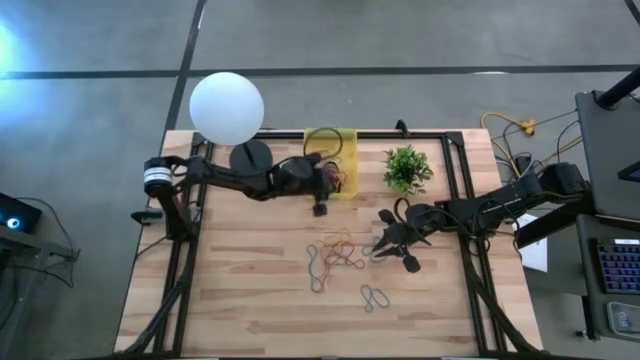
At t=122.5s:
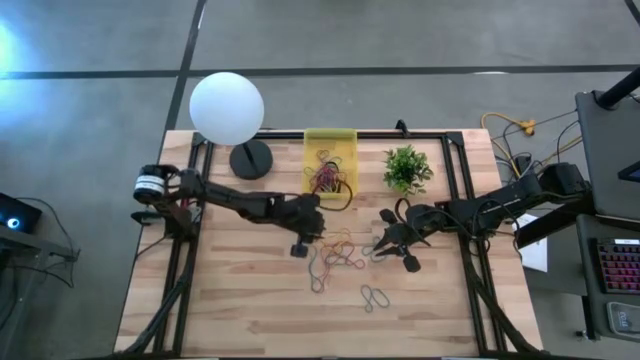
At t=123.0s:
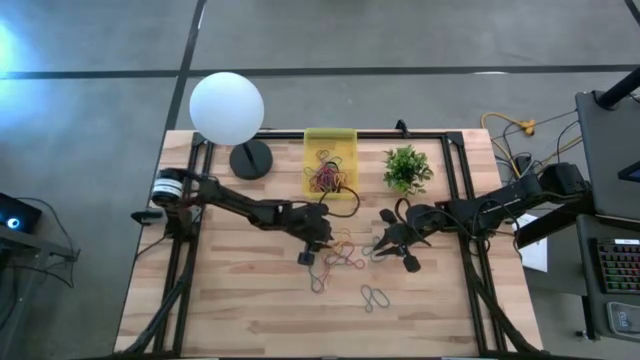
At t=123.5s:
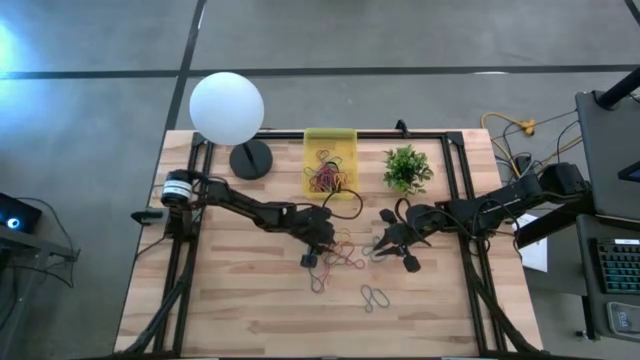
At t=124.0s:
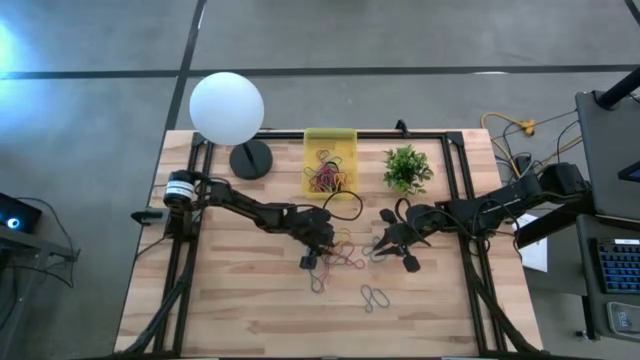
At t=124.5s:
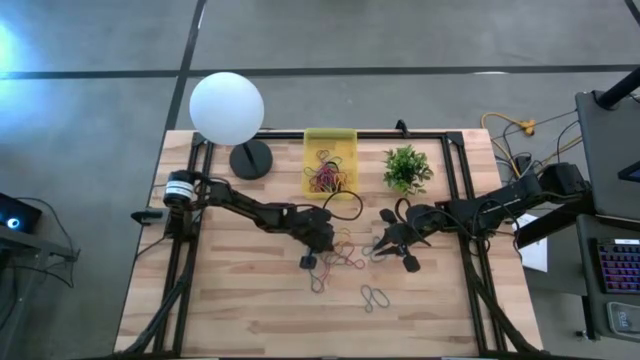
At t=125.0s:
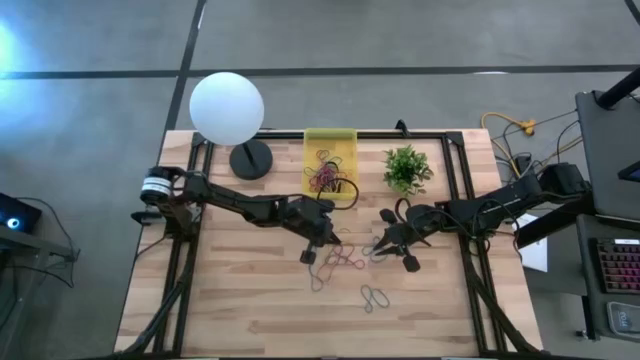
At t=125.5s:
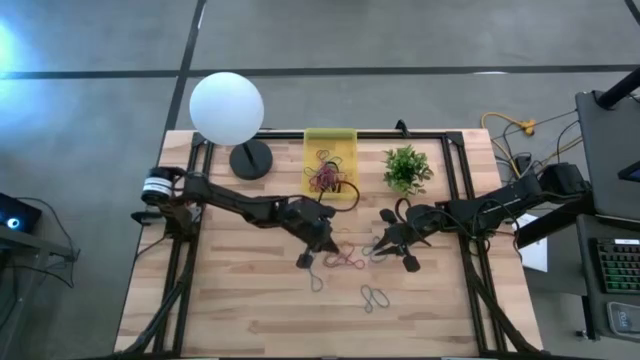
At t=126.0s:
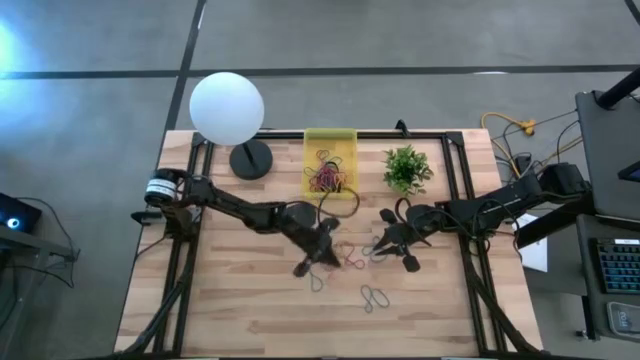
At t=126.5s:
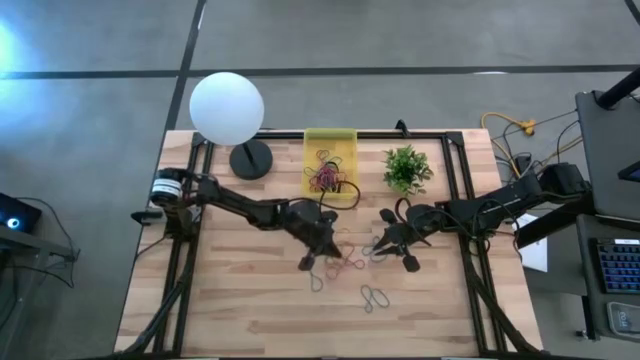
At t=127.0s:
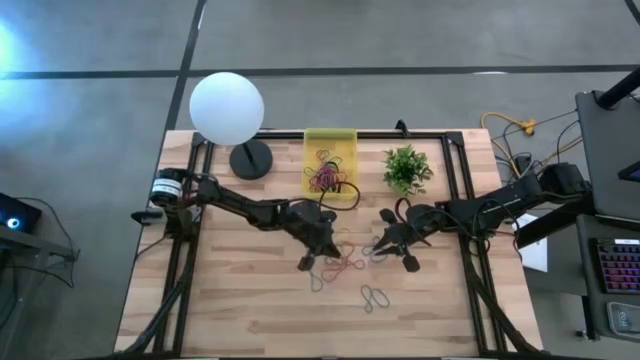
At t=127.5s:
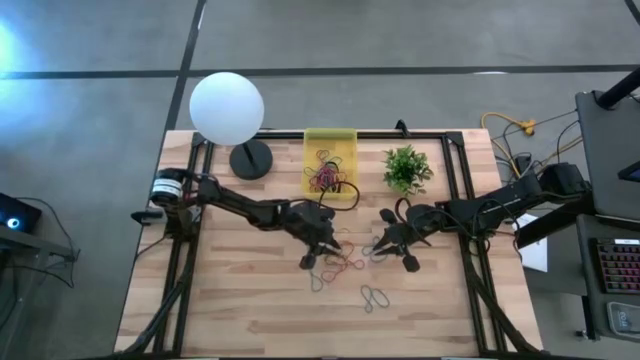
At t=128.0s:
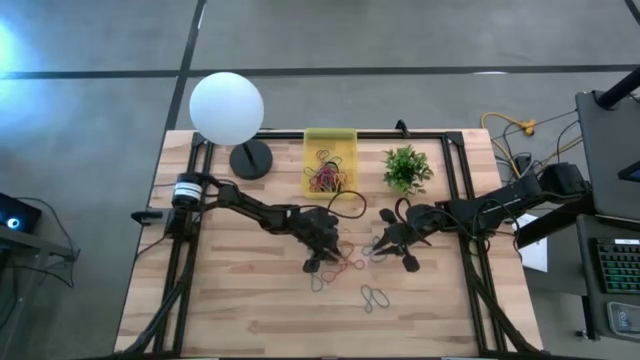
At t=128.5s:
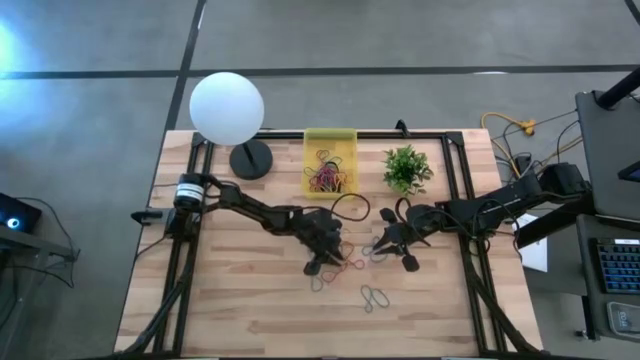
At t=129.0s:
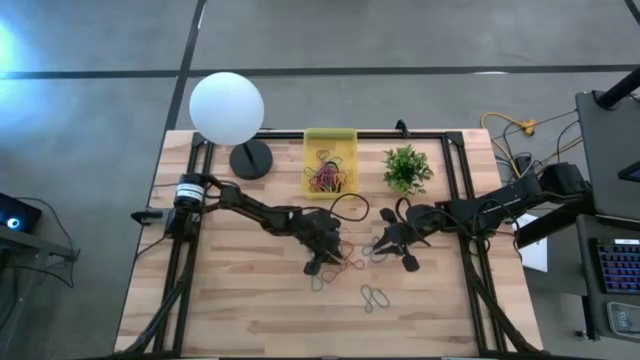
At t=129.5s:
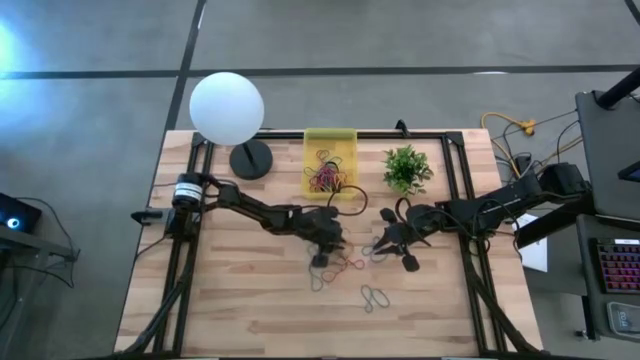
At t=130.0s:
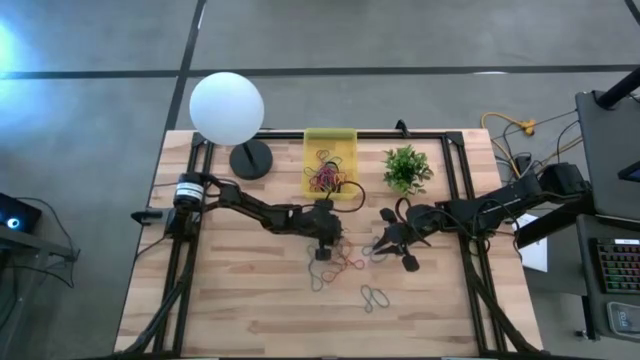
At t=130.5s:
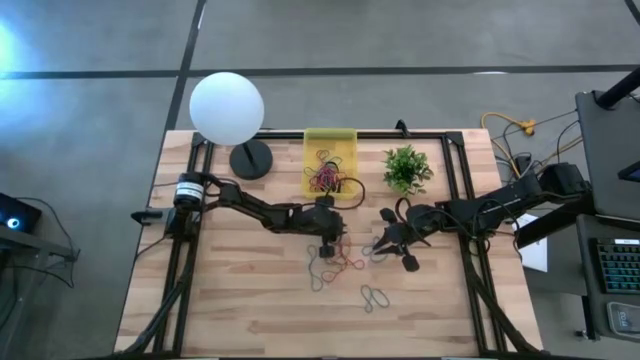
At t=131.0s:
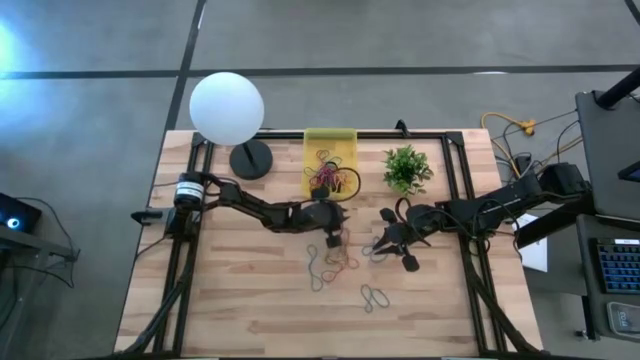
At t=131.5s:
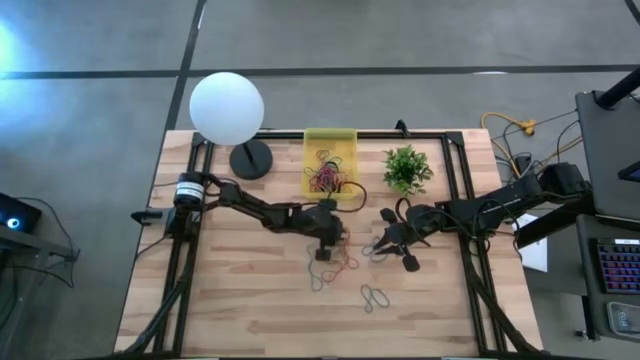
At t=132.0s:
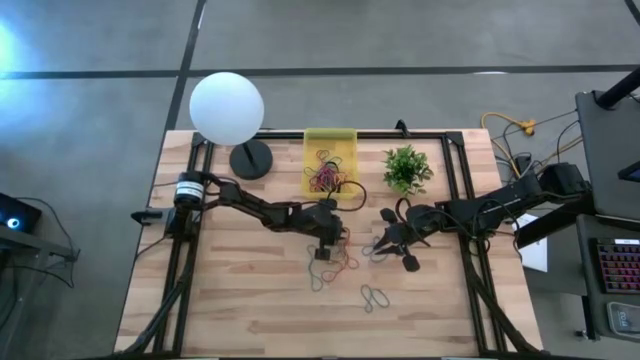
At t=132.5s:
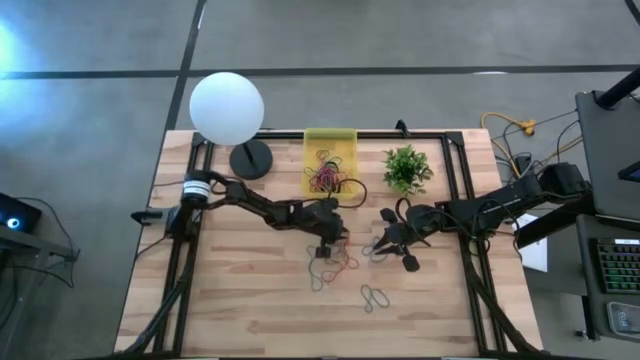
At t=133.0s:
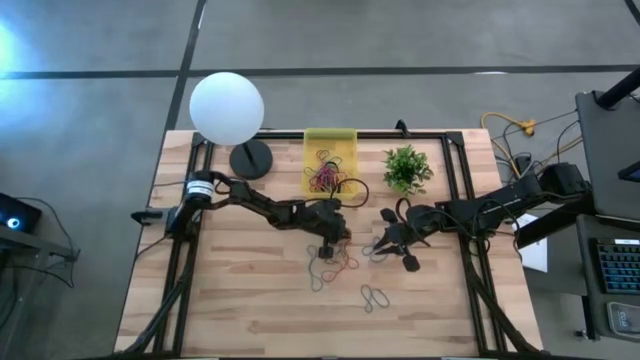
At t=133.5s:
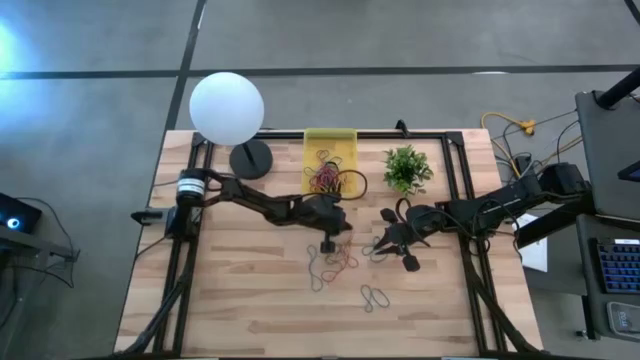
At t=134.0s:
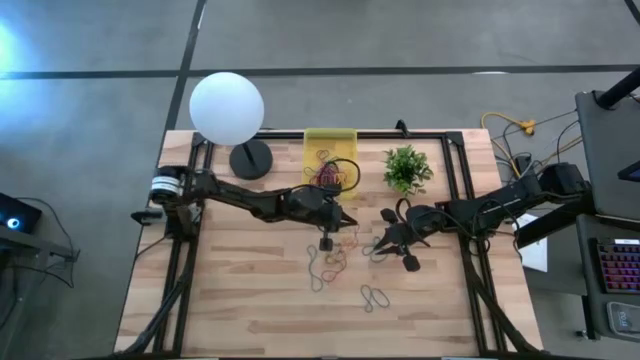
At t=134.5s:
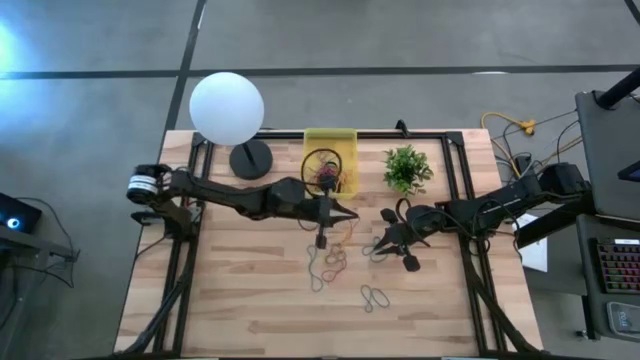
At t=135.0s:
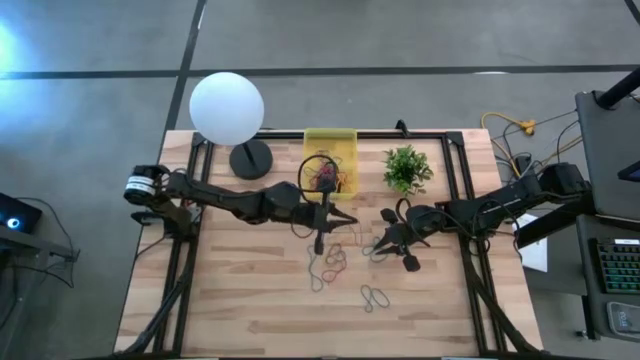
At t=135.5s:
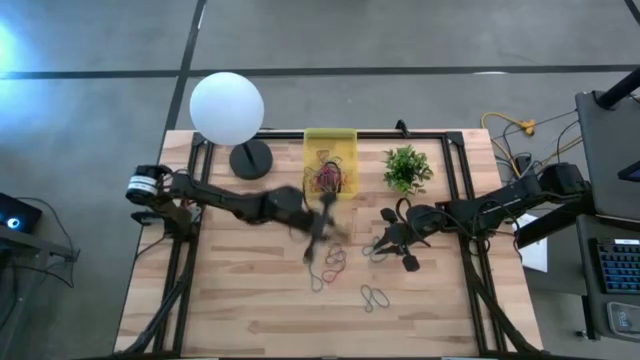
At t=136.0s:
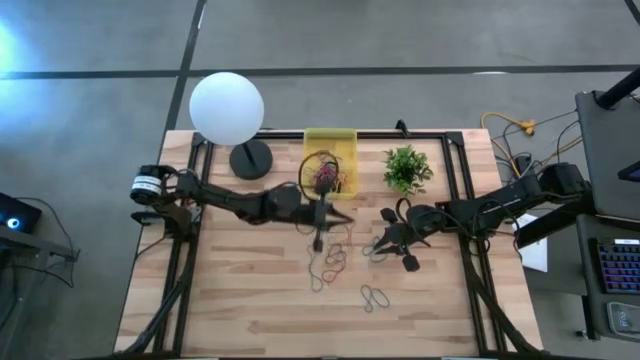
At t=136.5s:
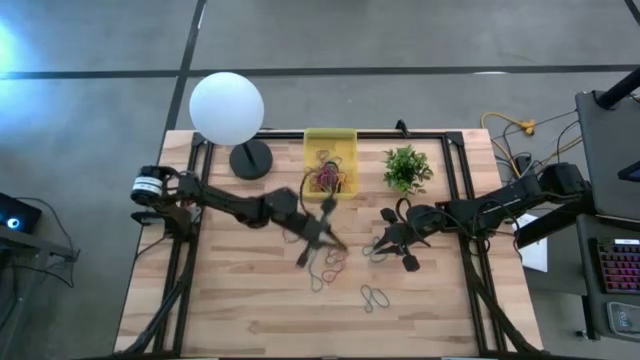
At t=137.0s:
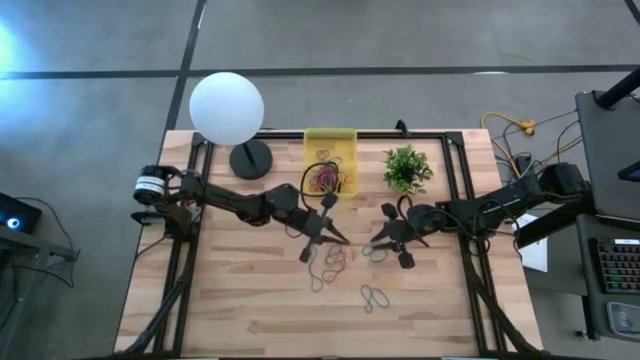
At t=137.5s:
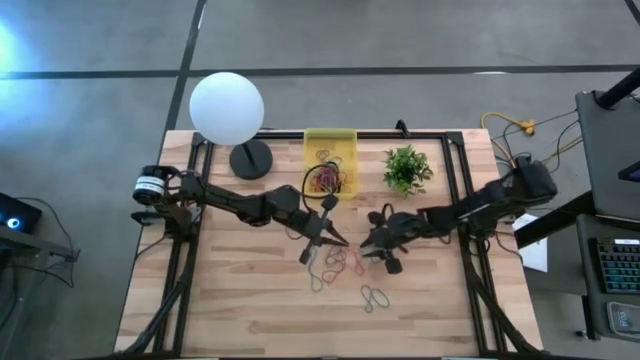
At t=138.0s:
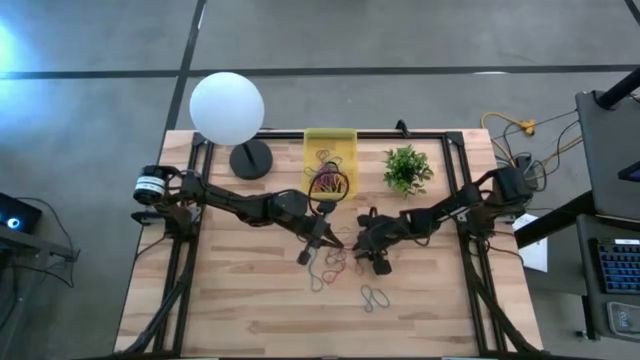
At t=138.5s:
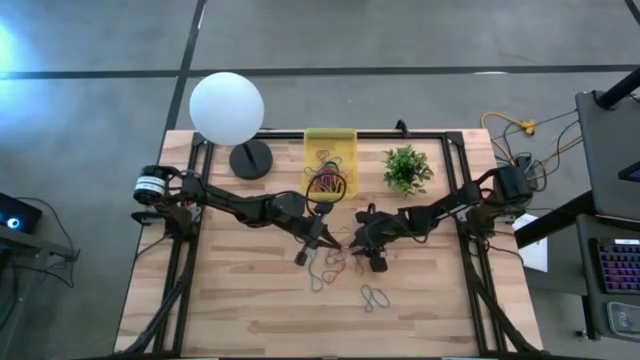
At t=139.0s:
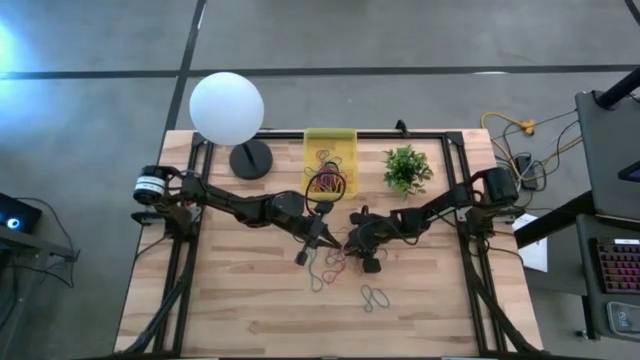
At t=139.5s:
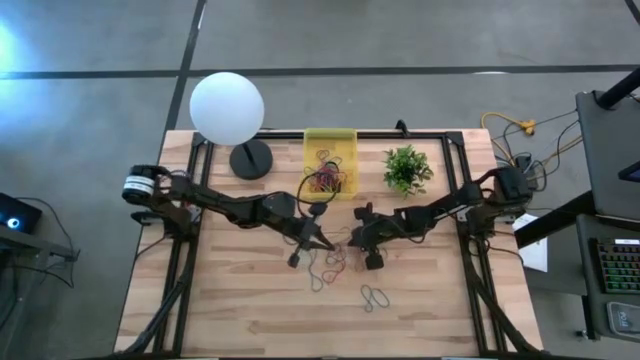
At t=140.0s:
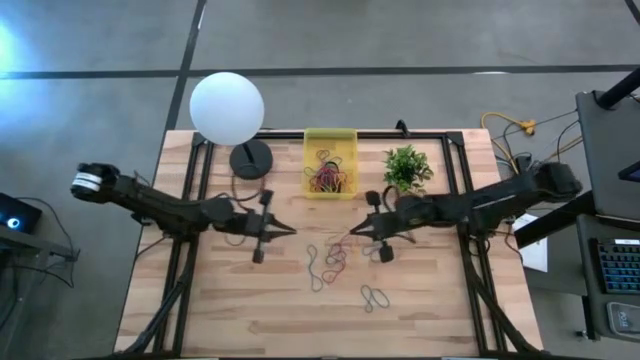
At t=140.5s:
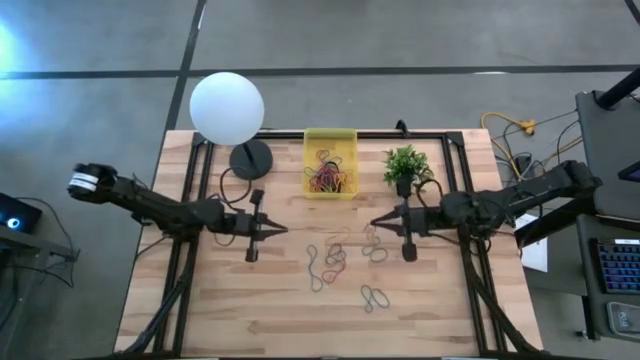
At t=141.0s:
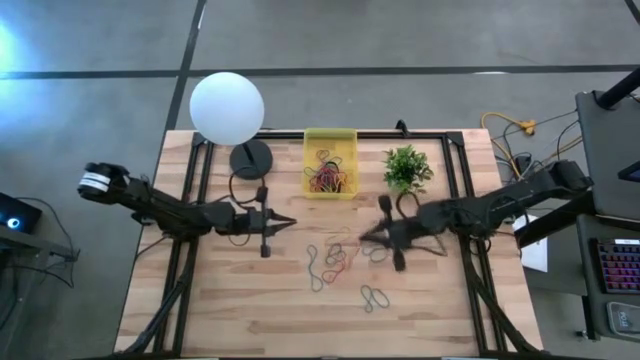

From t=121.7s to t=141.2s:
Task: Pick and place rubber bands into bin
Put the red rubber band into the yellow bin

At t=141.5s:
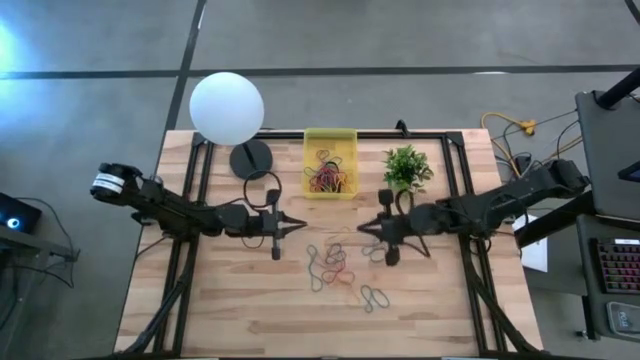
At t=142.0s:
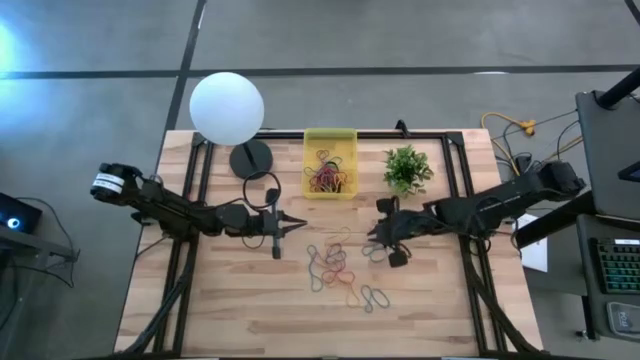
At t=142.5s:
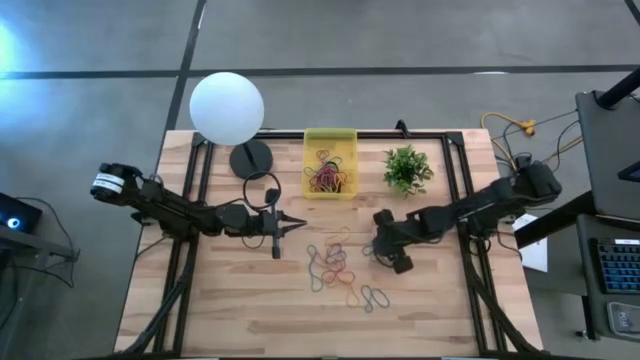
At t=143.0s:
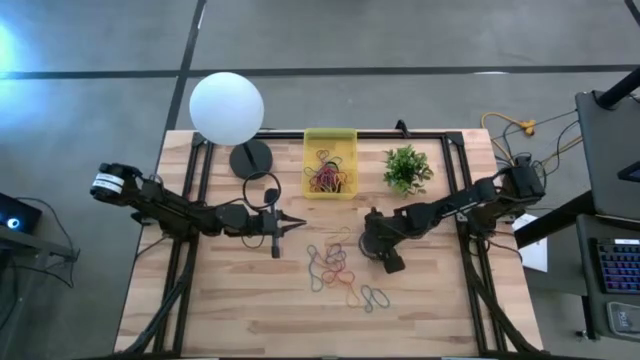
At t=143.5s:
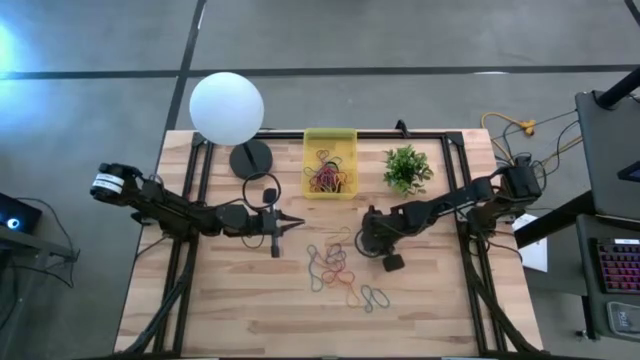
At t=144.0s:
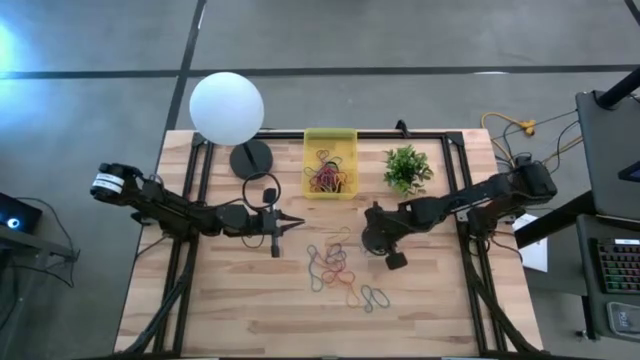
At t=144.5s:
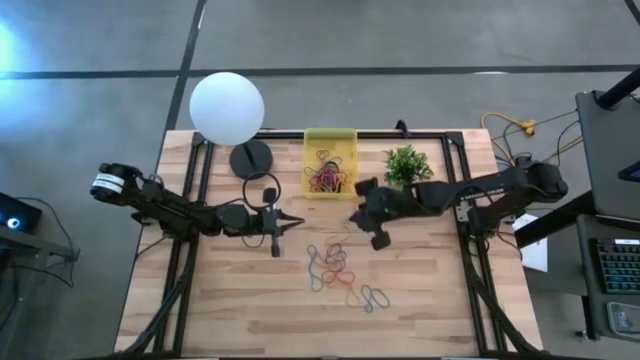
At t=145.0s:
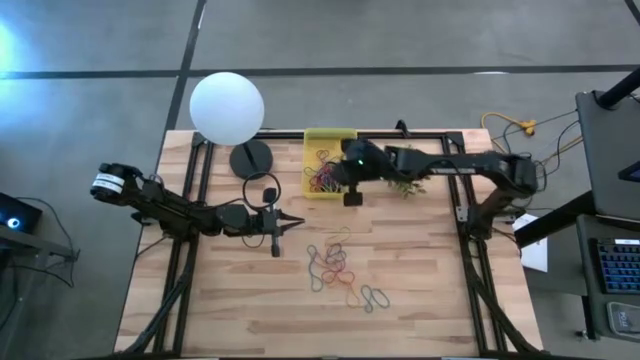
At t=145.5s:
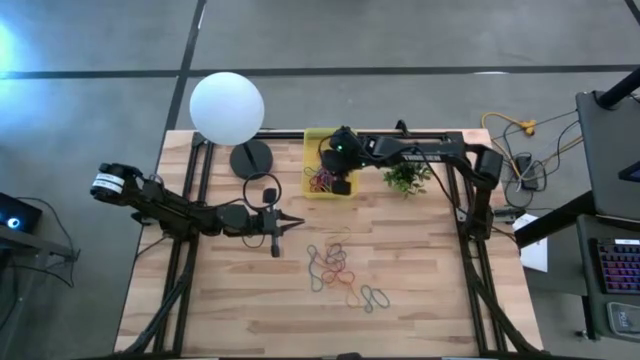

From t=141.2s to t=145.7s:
Put the blue rubber band into the yellow bin
